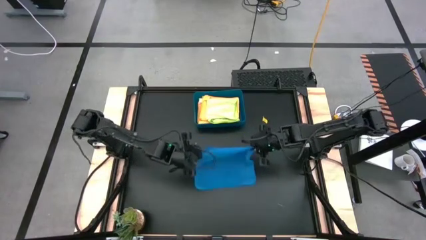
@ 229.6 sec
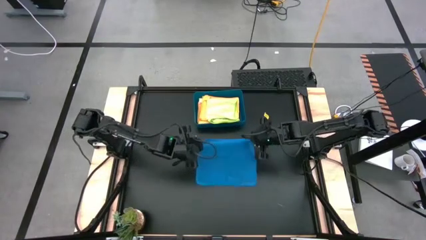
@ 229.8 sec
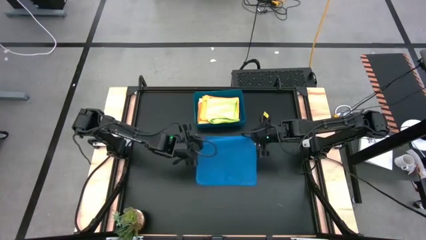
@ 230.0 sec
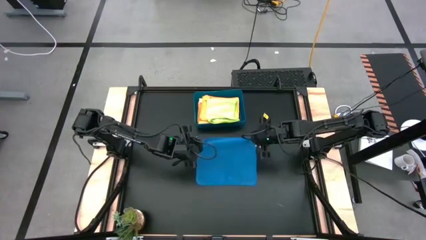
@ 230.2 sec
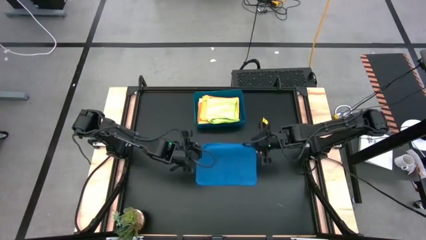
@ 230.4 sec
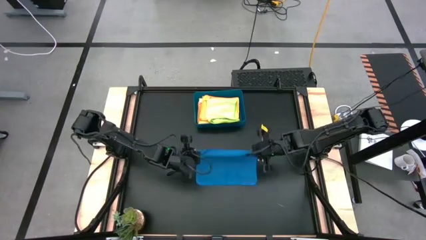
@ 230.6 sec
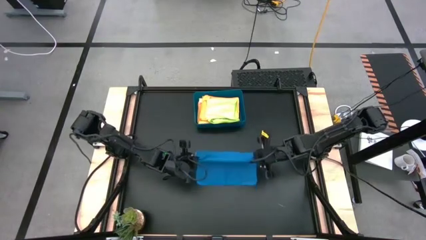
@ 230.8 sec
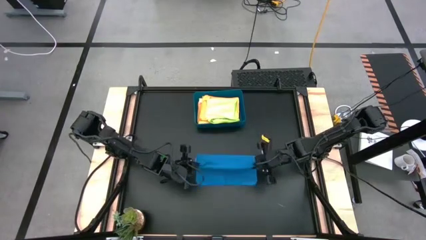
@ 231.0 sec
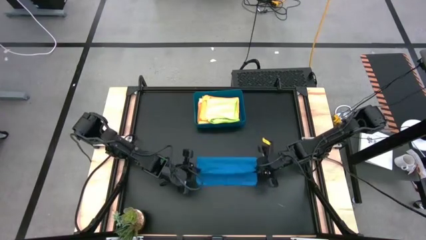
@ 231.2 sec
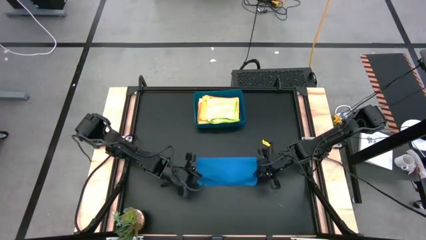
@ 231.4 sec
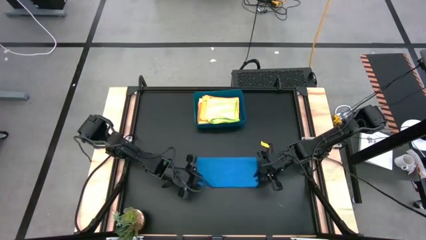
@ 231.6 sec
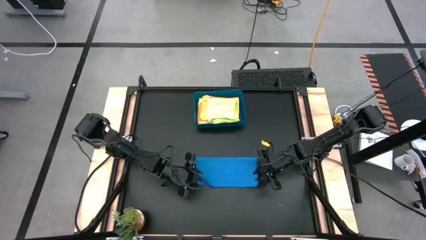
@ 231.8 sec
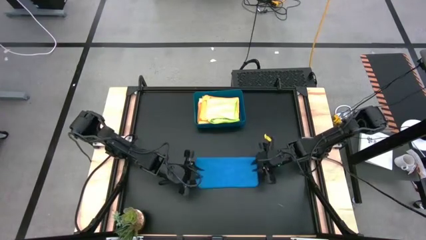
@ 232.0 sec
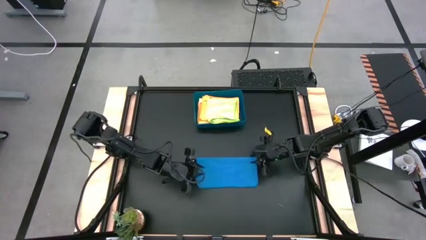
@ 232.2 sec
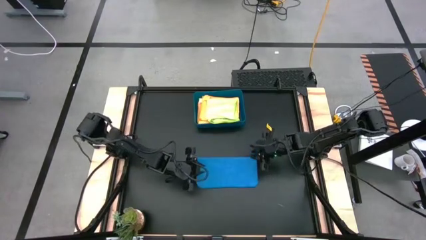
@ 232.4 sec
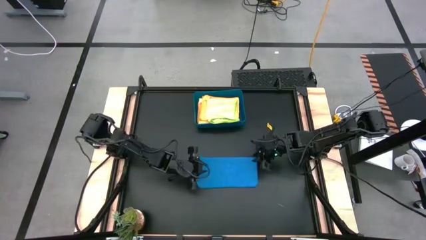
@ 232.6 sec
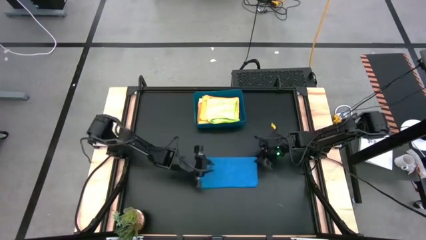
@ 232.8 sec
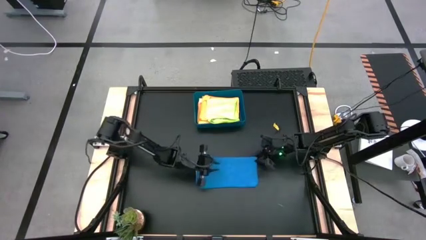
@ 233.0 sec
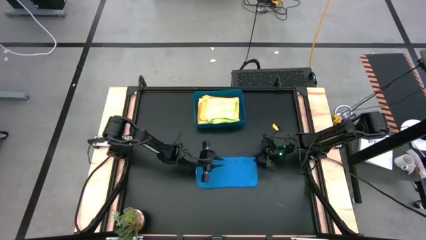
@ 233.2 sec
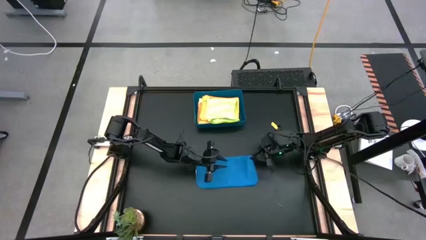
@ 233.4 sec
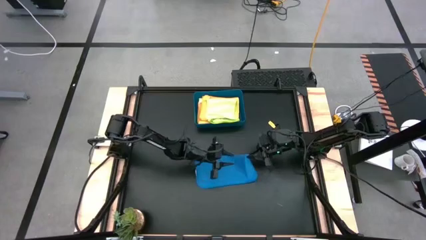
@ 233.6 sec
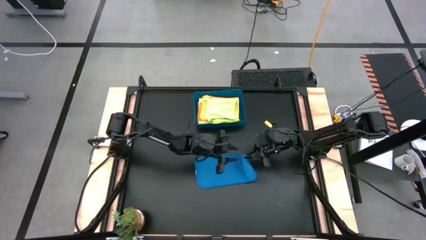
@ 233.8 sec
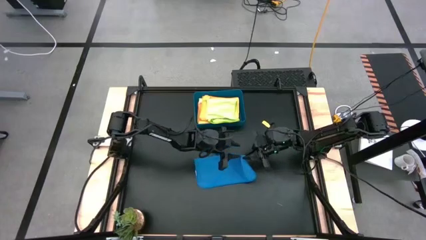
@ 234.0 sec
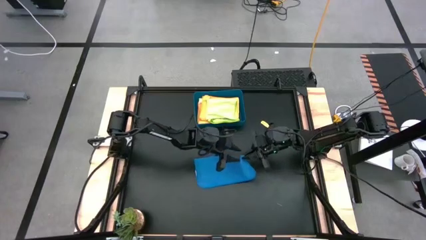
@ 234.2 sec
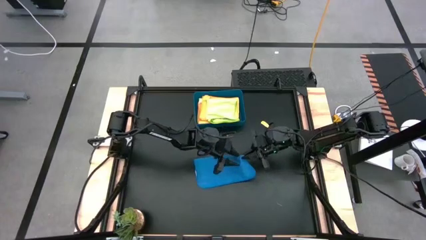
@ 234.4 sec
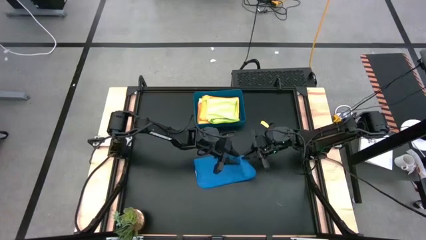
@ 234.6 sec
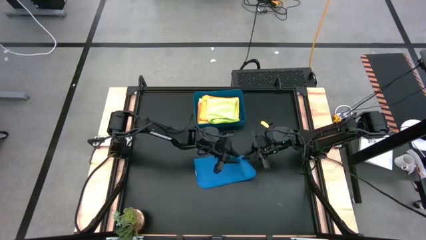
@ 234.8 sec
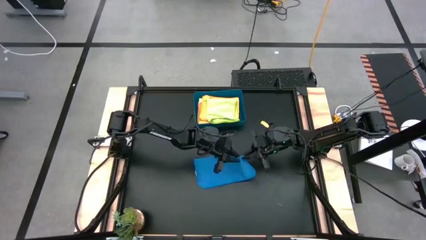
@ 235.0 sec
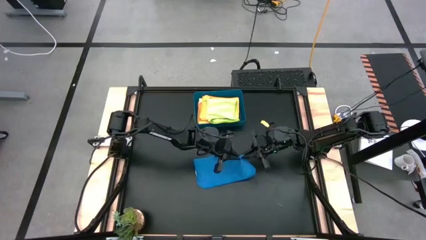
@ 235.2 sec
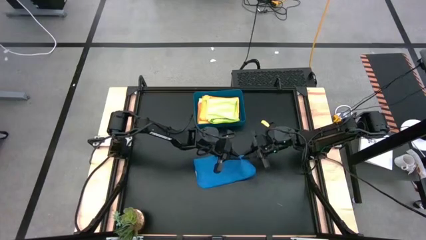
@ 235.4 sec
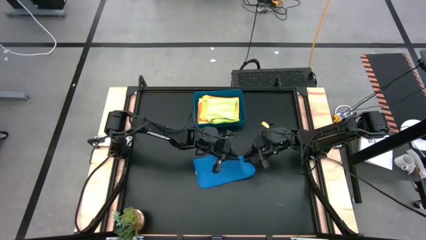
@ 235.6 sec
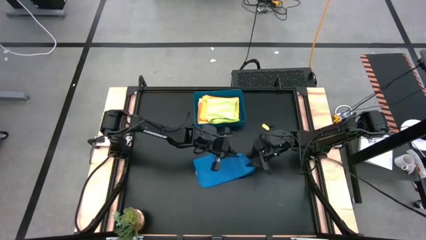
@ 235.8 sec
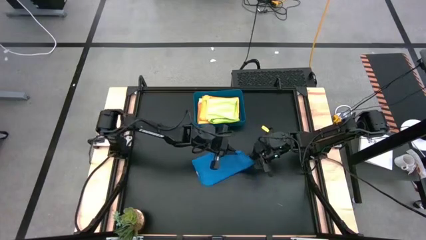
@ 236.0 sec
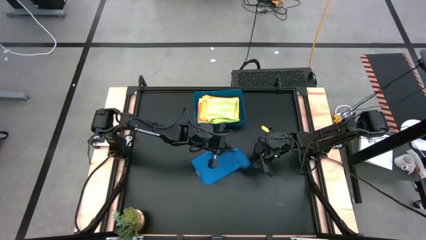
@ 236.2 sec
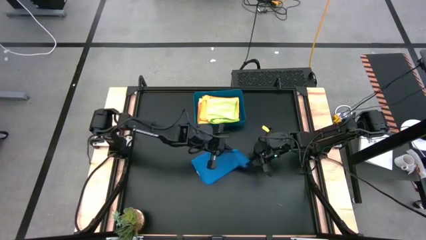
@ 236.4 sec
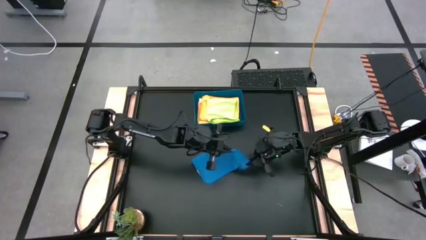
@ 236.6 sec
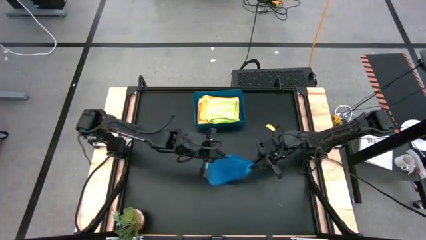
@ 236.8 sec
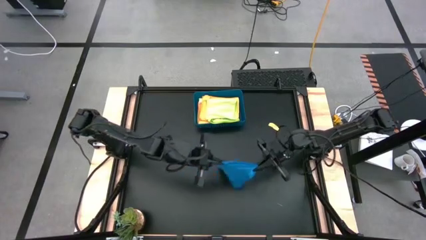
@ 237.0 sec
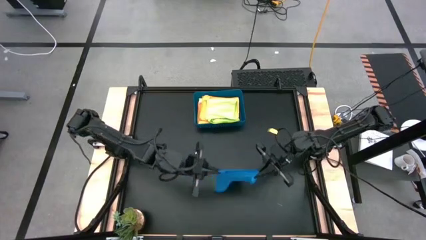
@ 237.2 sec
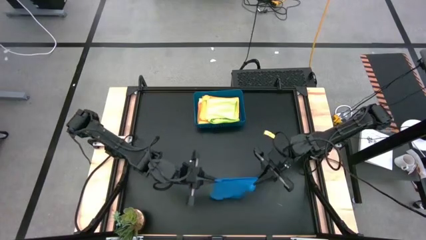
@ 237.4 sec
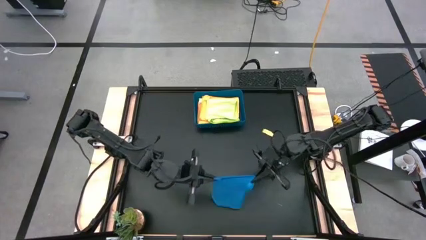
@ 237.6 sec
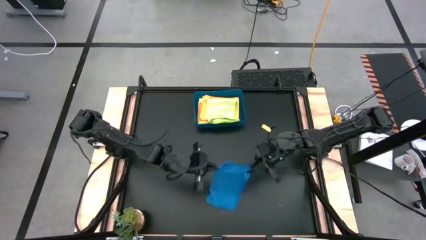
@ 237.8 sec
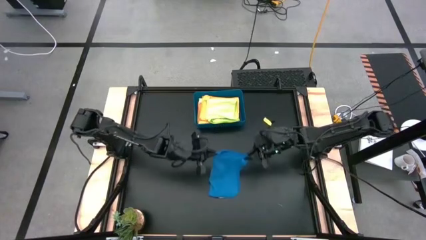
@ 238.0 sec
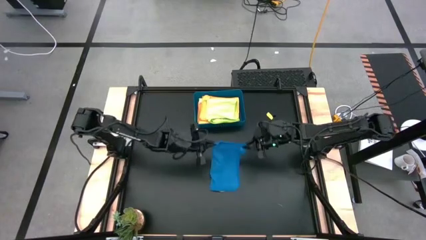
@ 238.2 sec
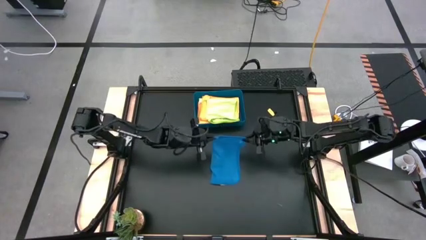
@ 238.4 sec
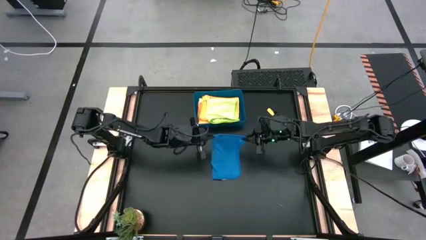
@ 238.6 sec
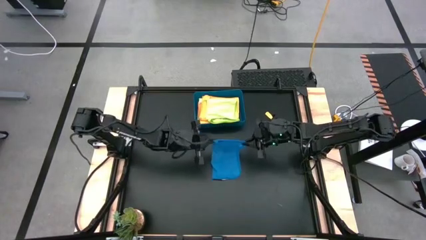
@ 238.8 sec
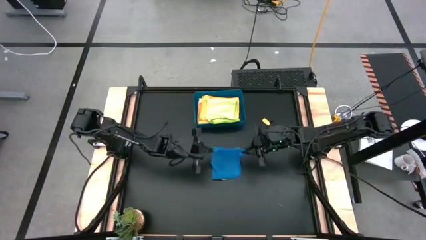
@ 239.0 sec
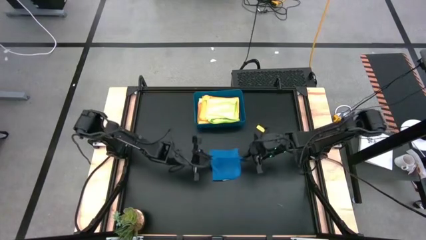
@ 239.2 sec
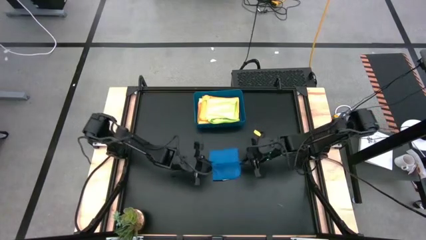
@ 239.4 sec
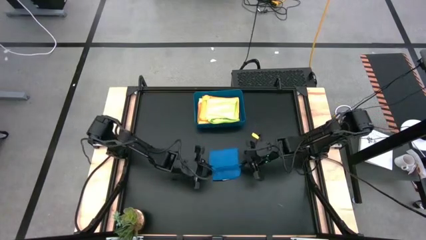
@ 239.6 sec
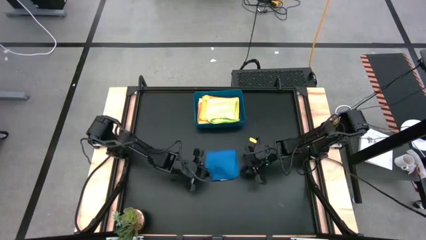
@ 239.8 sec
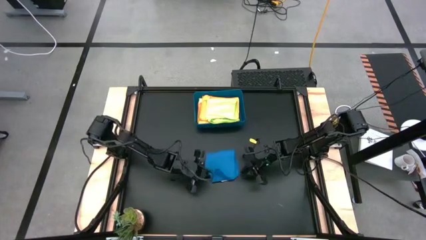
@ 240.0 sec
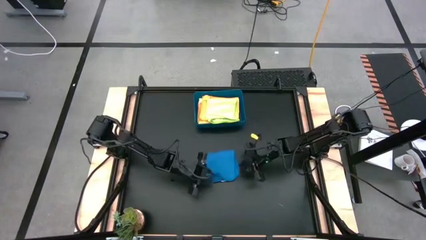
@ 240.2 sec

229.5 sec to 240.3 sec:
Task: Fold microfiber towels
Fold the blue microfiber cloth

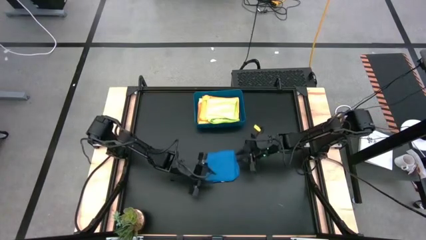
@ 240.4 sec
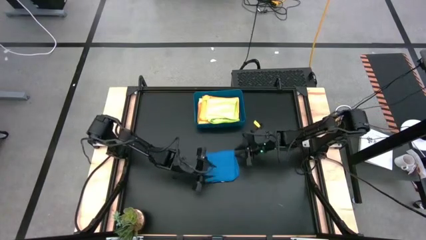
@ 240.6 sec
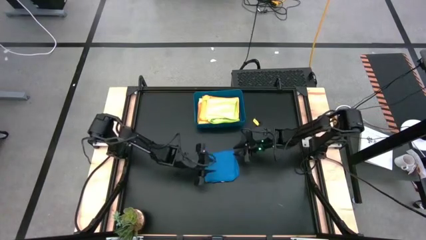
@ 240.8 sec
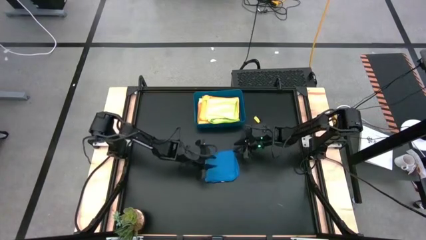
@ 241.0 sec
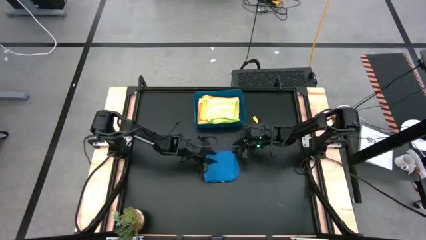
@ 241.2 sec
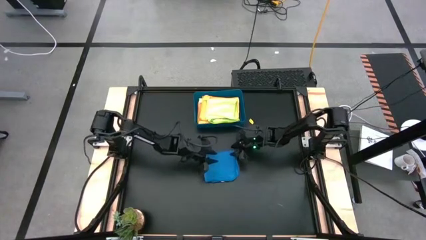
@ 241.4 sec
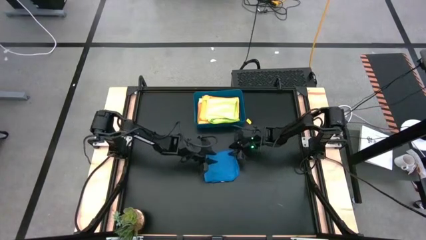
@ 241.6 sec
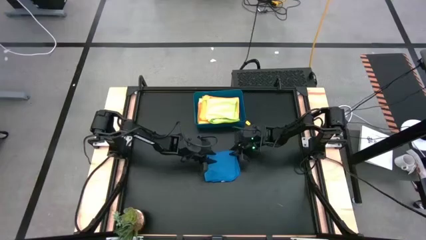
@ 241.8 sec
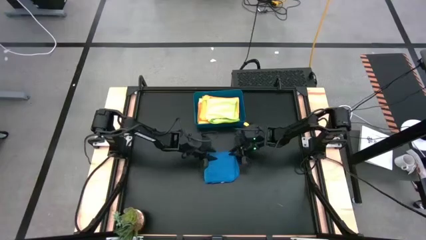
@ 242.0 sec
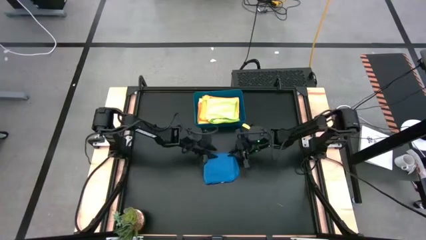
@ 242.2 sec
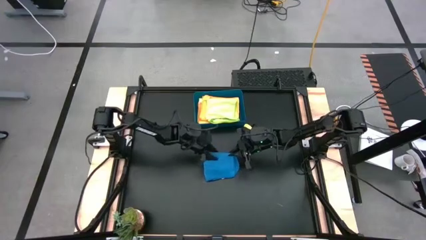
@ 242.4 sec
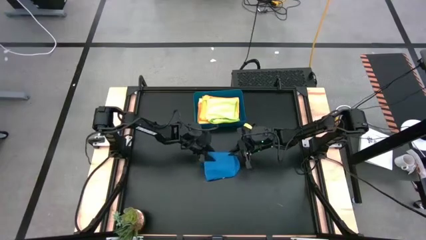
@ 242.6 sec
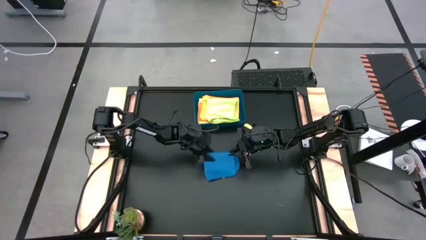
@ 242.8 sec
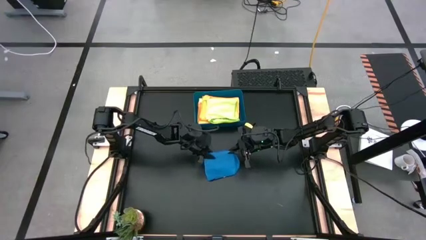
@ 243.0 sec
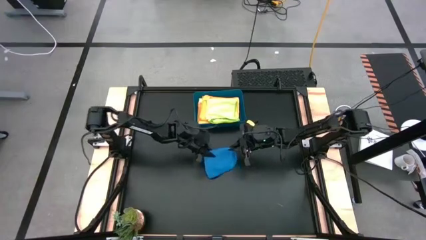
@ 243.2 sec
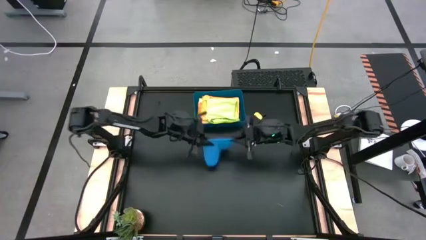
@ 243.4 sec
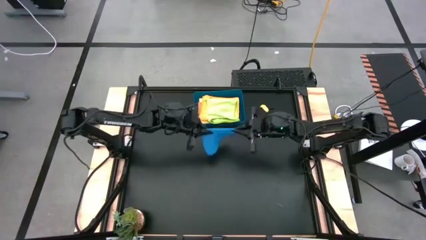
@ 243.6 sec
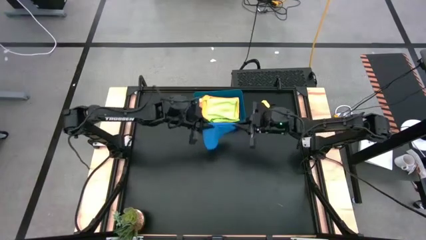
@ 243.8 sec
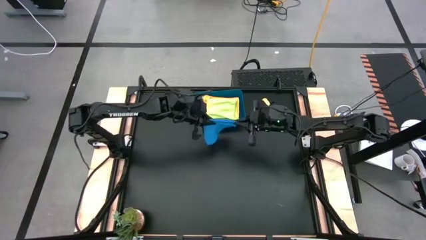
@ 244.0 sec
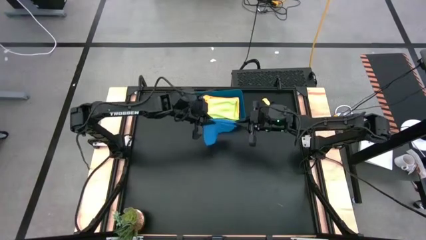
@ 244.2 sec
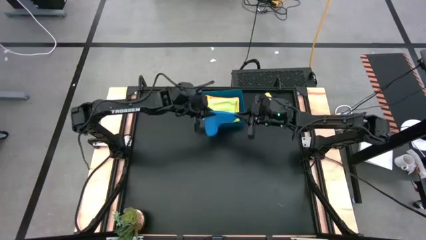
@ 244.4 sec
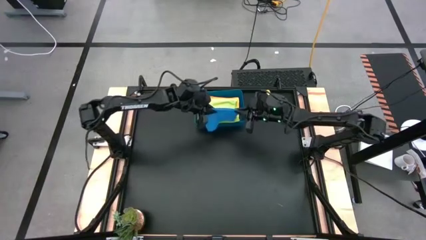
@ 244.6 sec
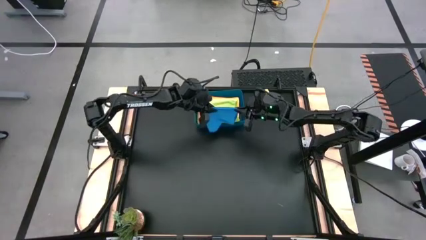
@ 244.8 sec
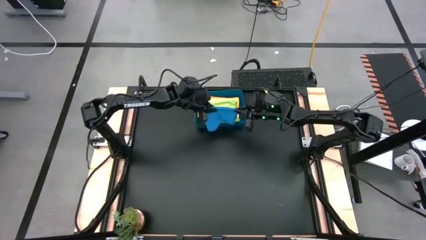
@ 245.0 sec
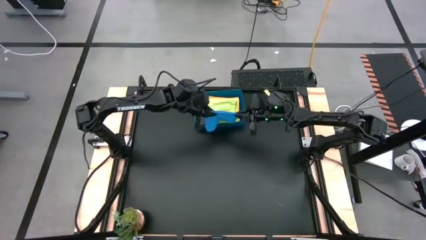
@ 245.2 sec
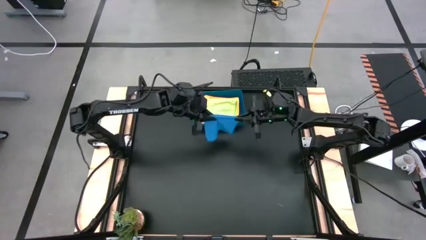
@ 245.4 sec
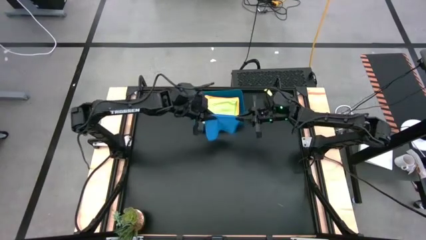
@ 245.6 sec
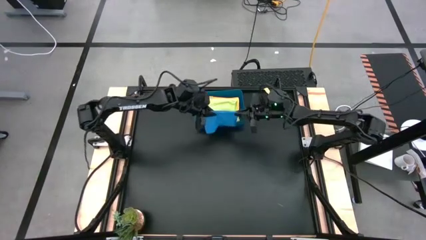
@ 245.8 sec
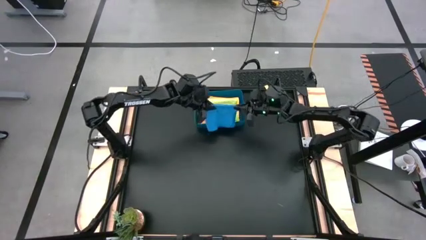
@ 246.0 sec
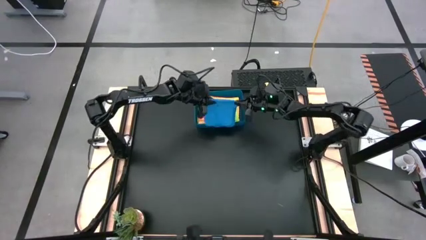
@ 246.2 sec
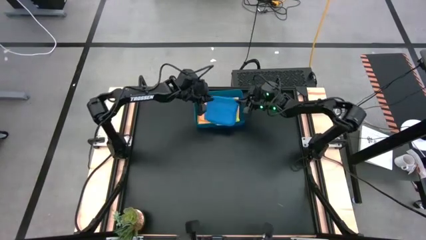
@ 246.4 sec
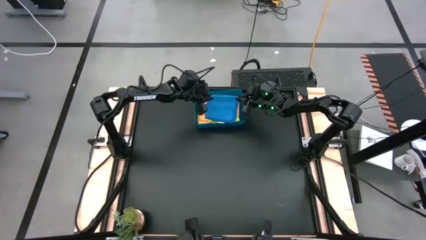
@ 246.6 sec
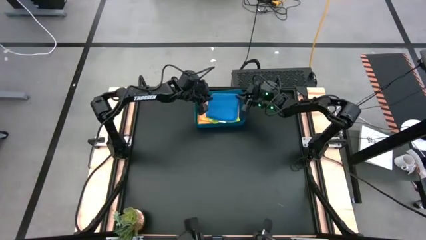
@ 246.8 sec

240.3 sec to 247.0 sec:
Put the folded blue microfiber cloth into the blue bin
